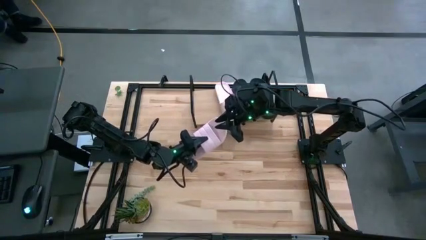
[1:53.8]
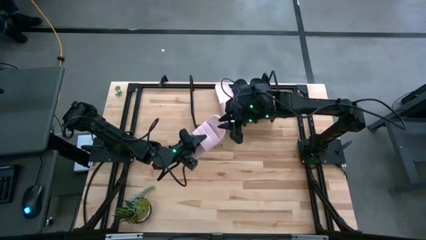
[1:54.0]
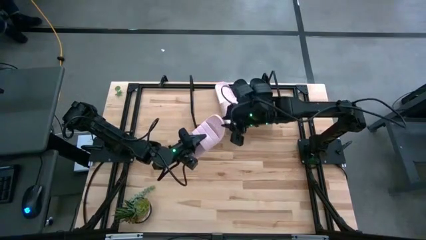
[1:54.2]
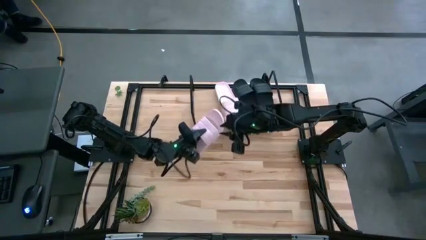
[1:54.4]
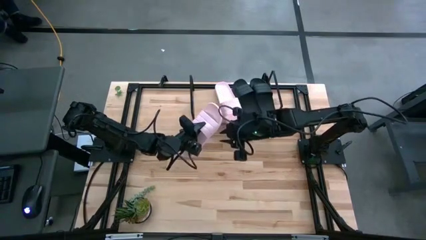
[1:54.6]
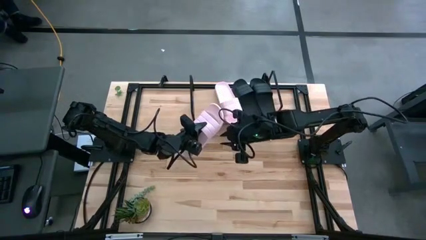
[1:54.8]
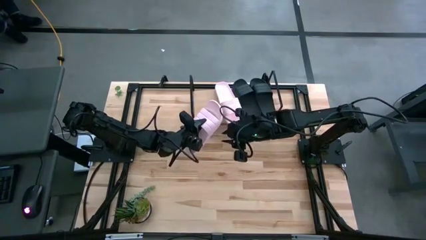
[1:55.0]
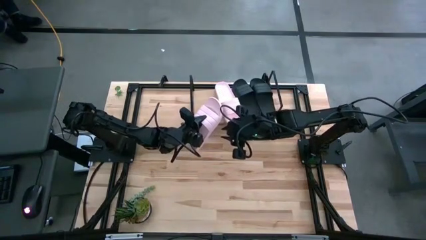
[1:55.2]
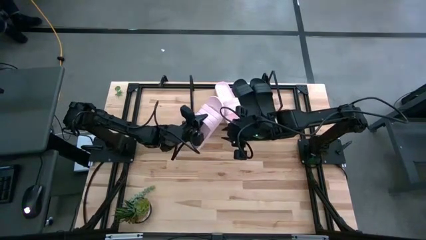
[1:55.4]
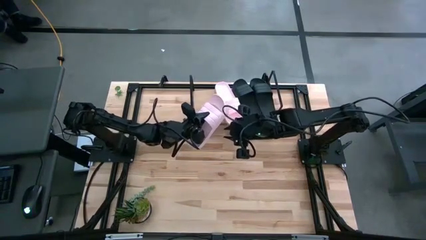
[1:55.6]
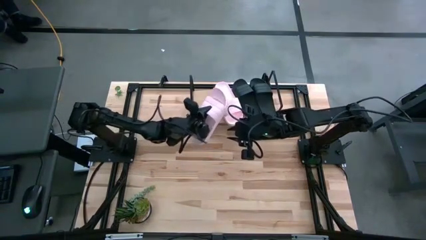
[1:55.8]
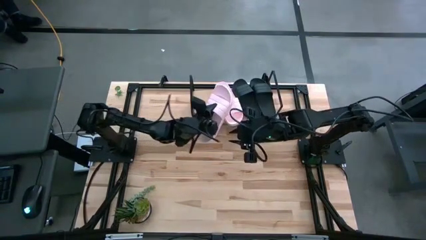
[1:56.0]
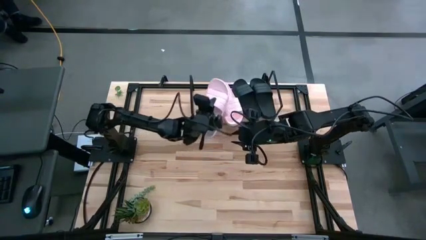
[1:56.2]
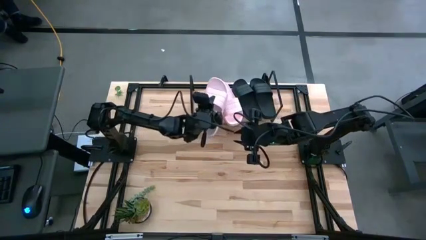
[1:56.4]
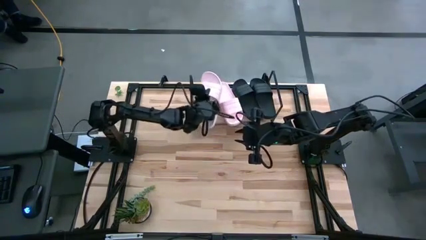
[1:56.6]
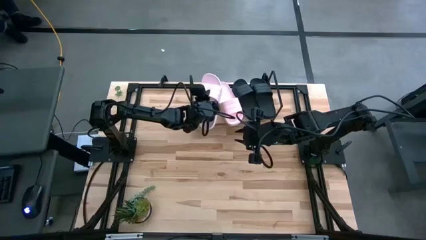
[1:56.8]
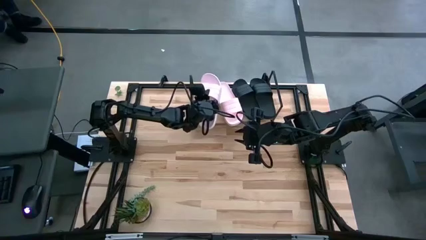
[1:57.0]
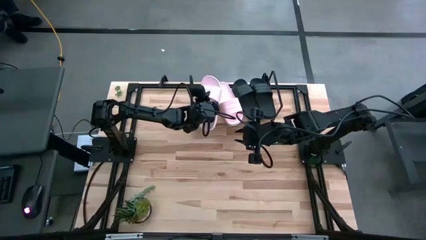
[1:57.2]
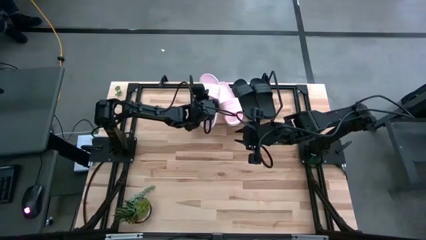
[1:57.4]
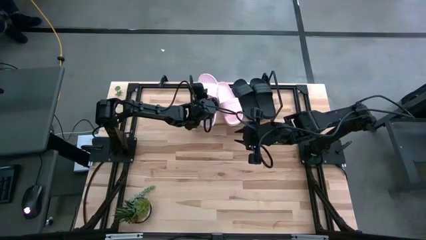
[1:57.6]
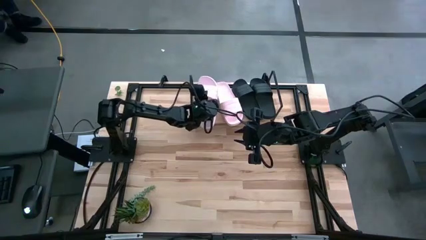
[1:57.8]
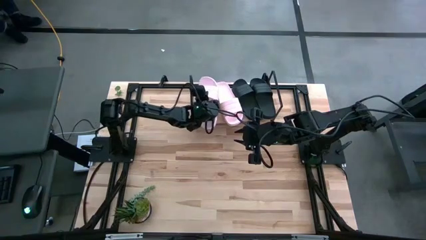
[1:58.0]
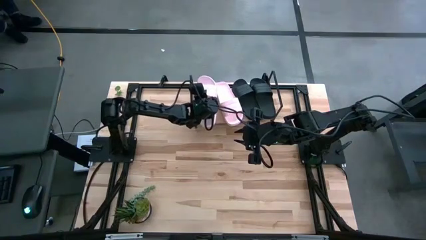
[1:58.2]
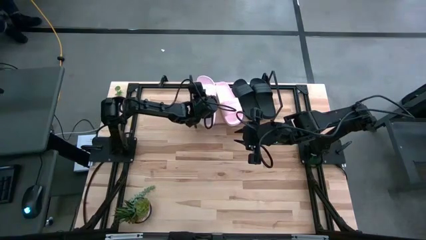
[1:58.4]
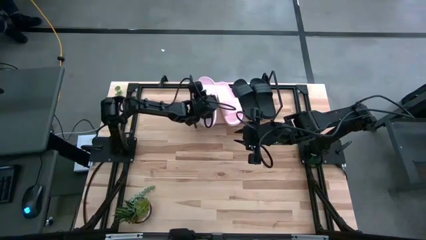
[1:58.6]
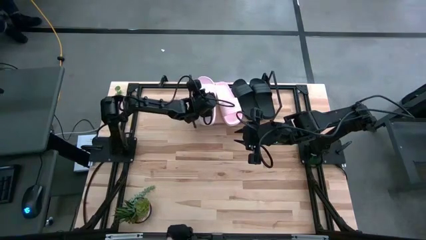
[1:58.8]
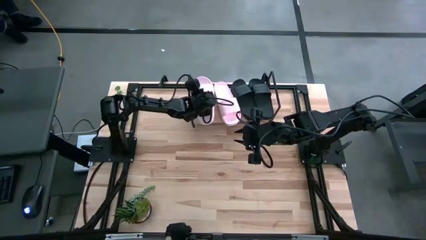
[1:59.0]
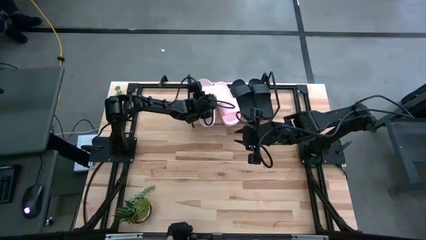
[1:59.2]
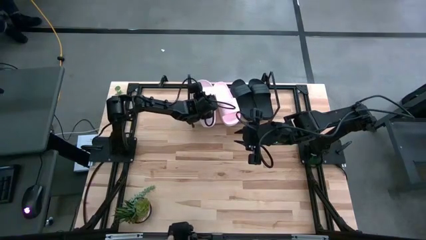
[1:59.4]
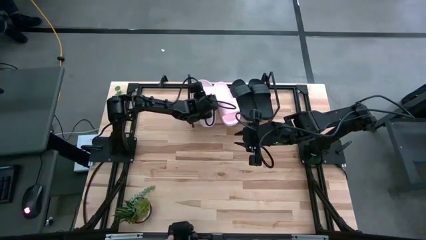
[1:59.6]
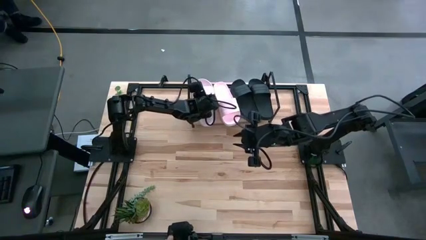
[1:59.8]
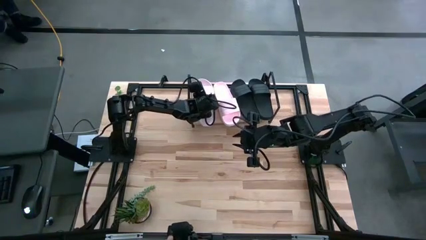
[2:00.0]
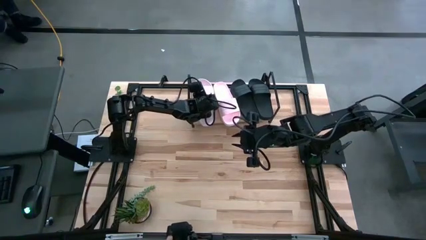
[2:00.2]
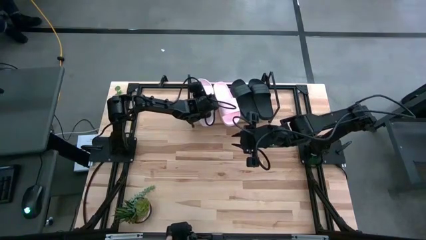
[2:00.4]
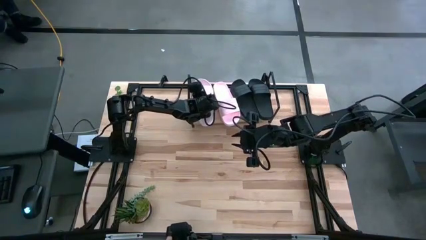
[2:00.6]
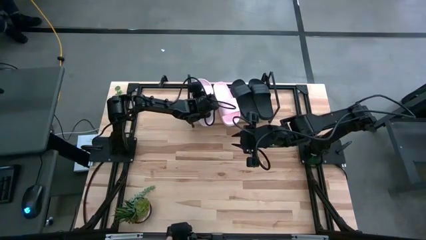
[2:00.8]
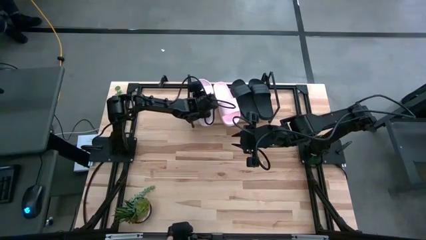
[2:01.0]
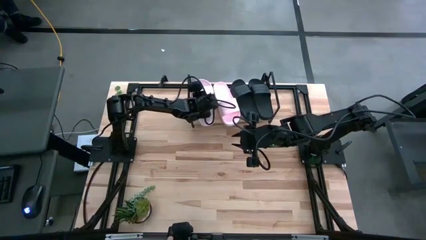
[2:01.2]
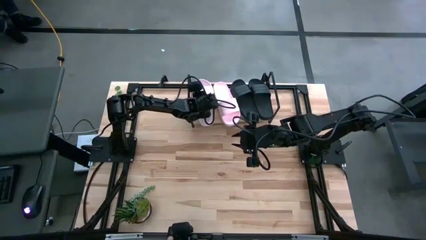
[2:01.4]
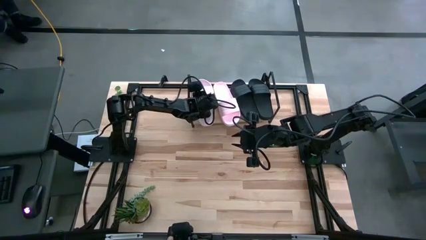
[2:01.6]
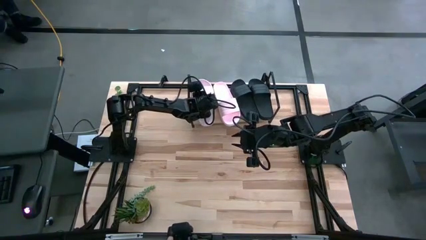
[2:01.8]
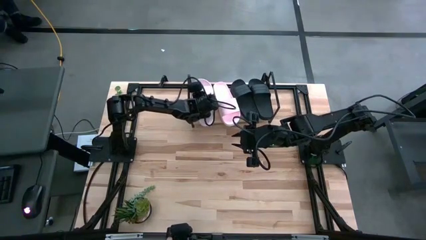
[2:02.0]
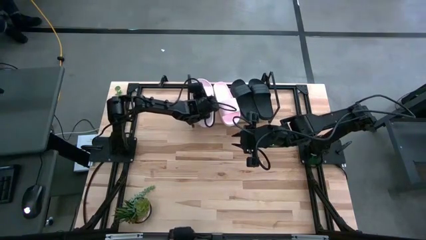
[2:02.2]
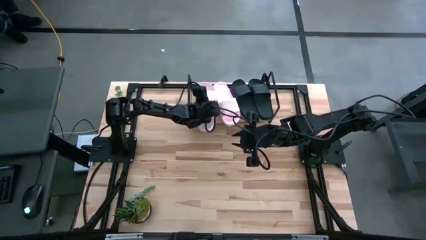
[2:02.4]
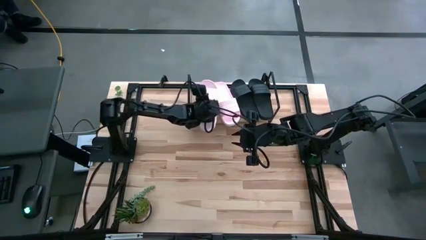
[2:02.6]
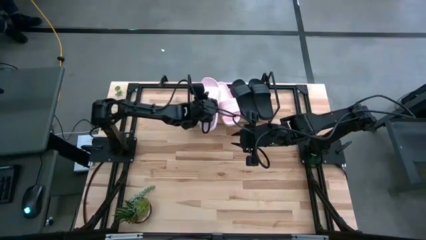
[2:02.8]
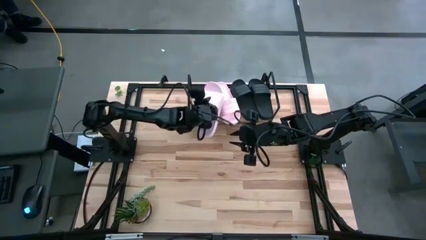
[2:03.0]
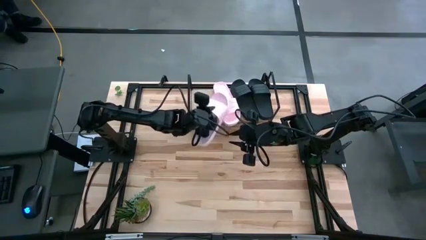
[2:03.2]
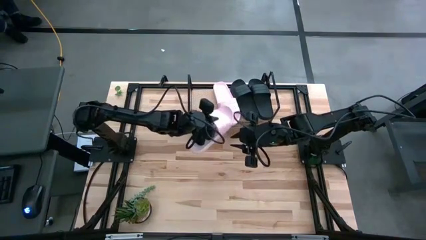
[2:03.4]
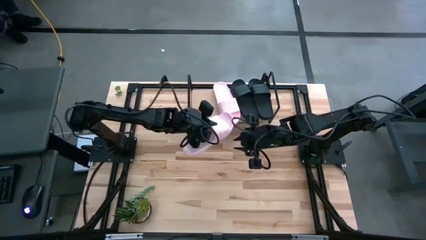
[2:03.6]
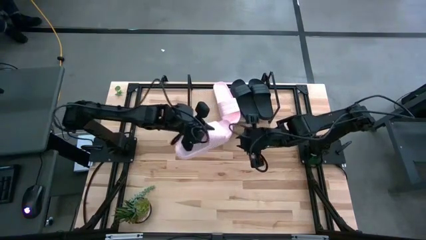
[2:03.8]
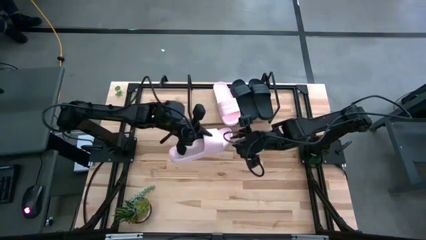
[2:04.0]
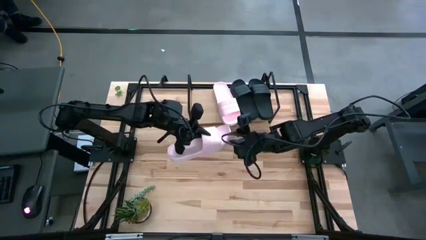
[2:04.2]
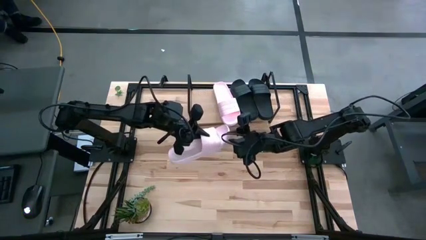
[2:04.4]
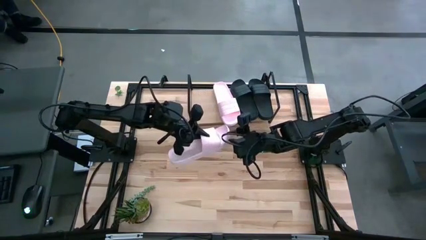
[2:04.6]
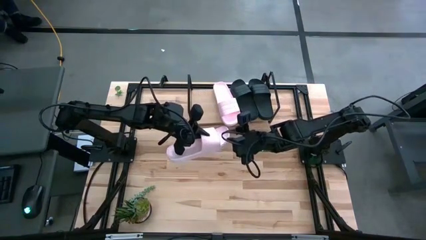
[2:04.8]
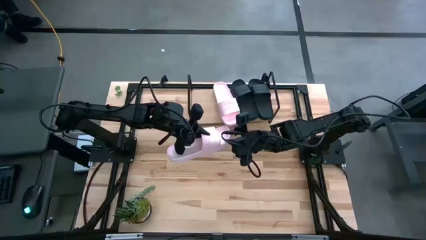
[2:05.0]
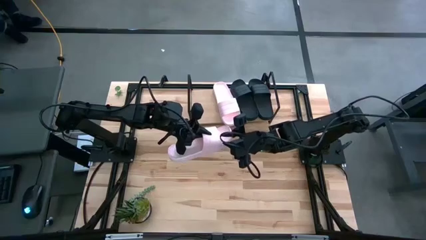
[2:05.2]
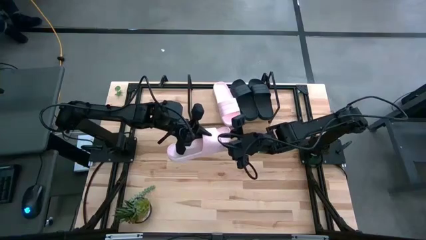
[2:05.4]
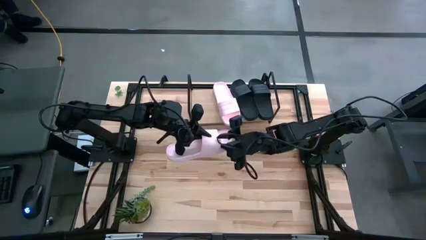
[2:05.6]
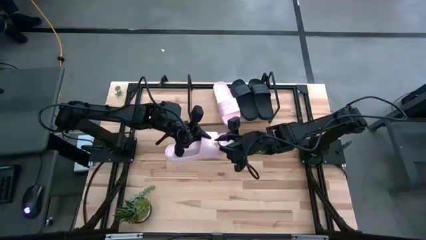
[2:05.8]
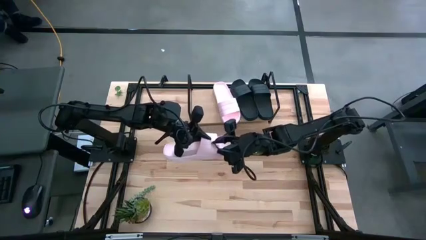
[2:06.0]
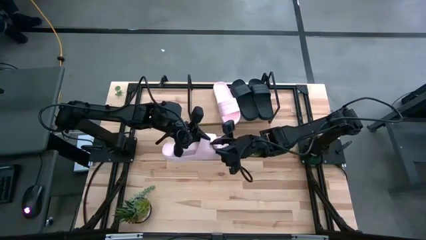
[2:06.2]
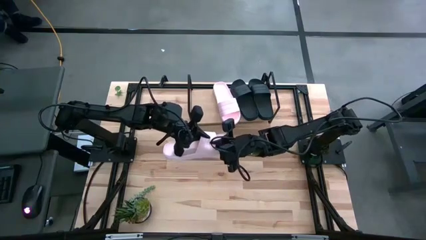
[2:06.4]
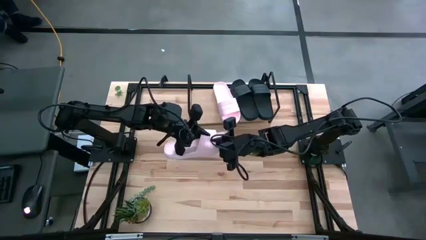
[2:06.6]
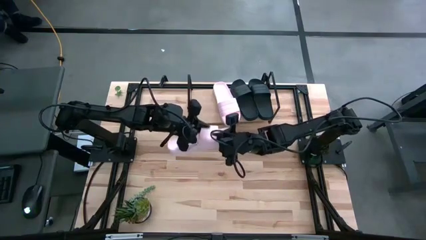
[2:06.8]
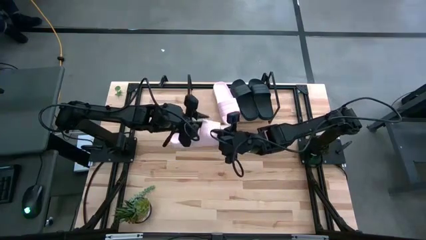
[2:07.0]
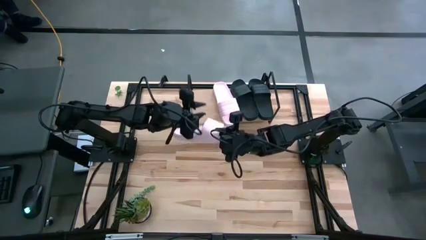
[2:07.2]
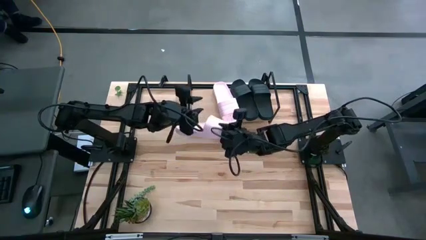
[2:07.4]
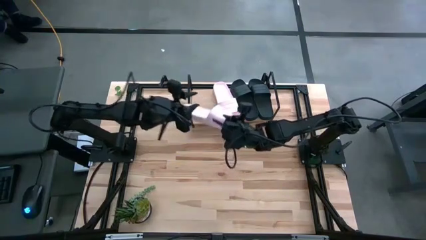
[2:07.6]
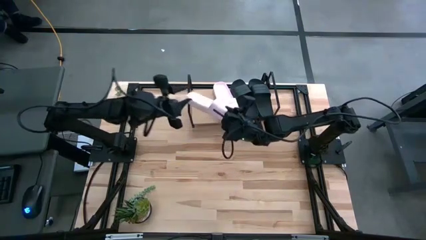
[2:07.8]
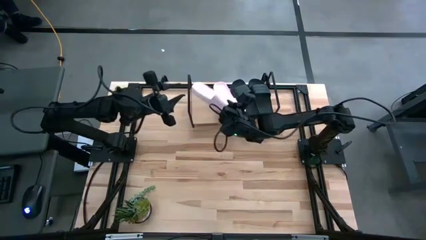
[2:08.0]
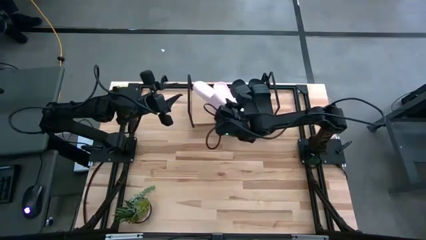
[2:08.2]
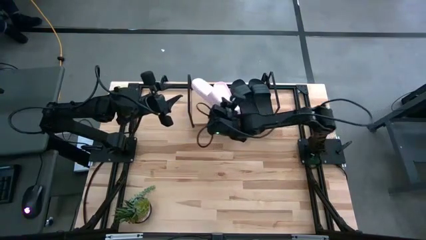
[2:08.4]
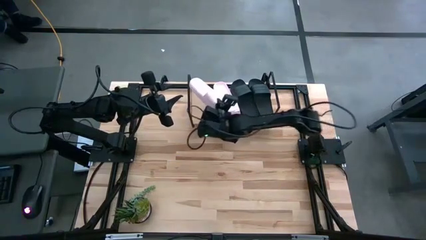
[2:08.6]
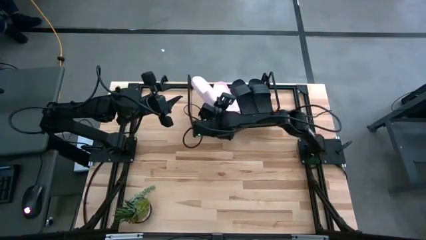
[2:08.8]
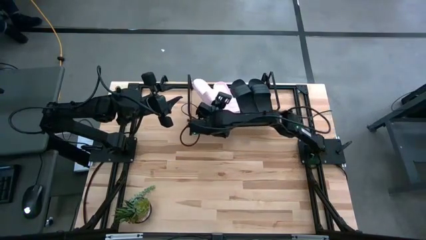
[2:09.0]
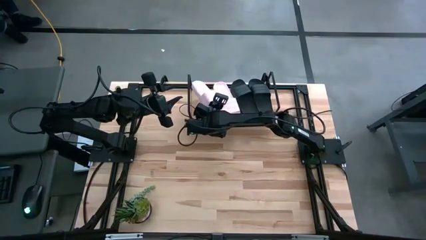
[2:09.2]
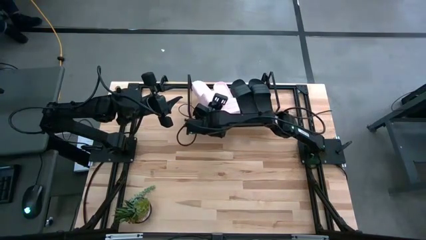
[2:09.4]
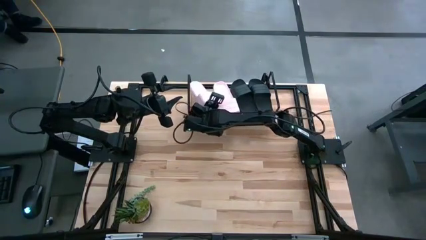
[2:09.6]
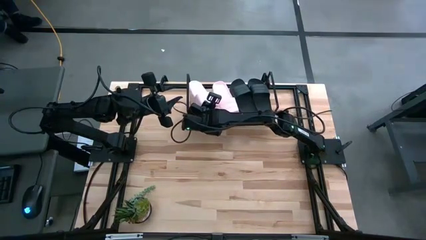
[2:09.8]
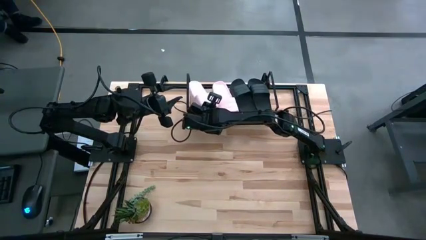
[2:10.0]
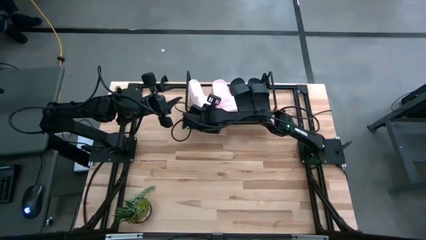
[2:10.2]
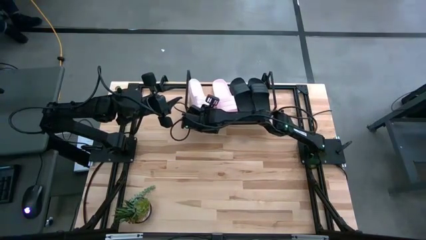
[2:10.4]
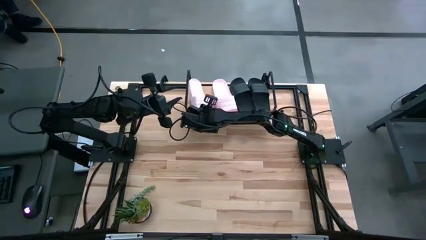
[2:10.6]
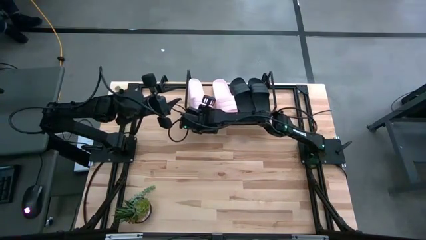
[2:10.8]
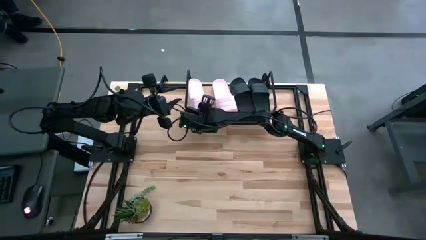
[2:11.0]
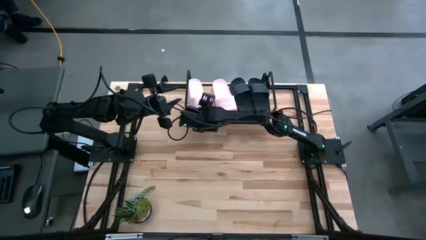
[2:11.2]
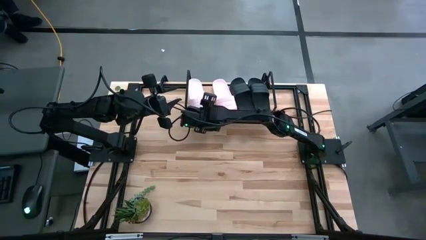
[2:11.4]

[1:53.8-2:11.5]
Task: Pick and place slides into the shelf
Put the pink slide on the shelf
